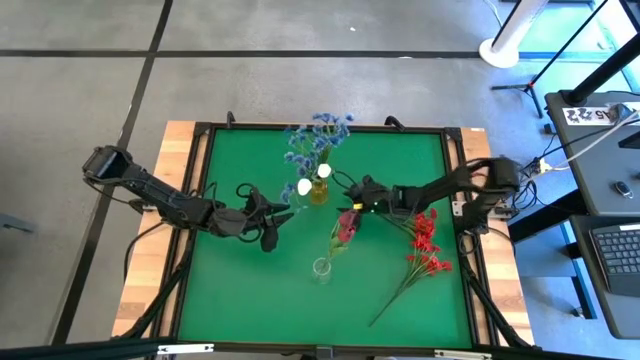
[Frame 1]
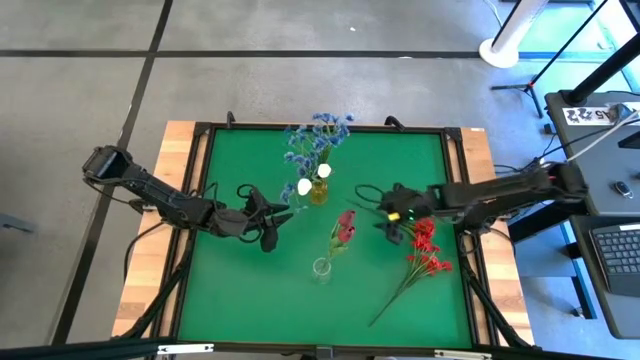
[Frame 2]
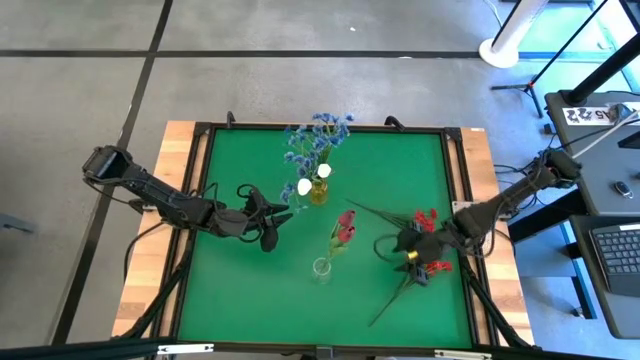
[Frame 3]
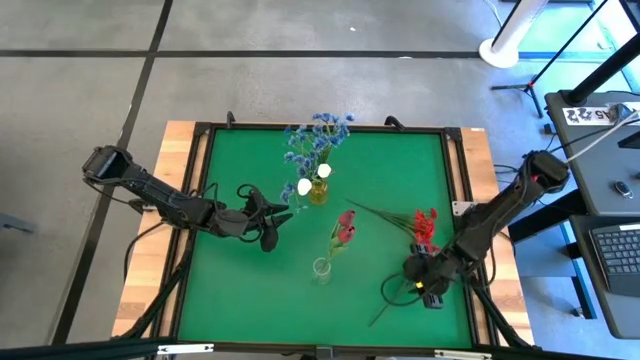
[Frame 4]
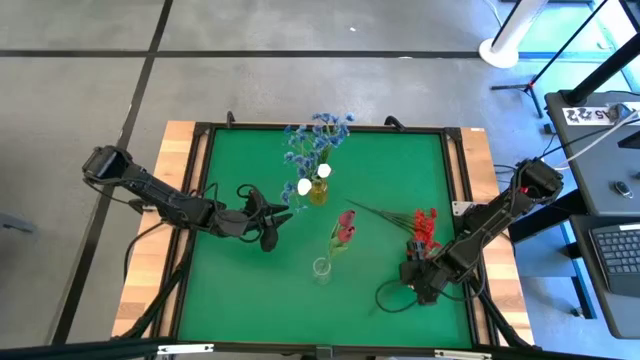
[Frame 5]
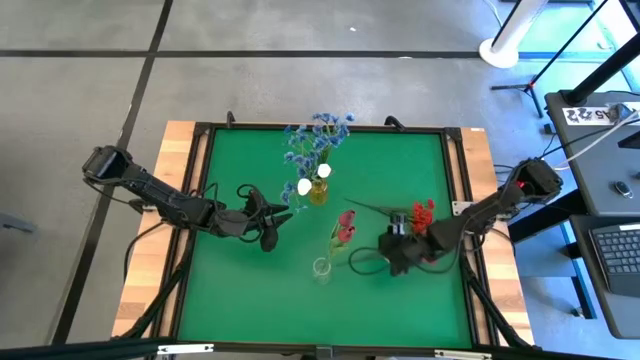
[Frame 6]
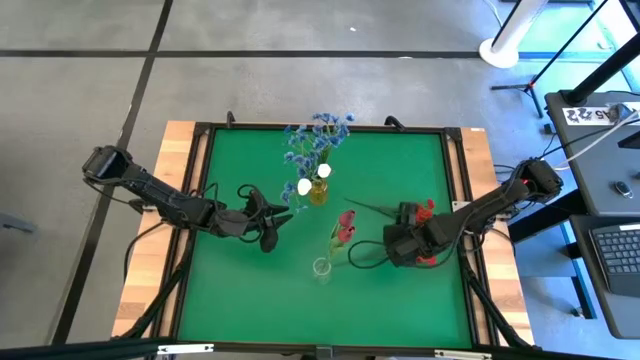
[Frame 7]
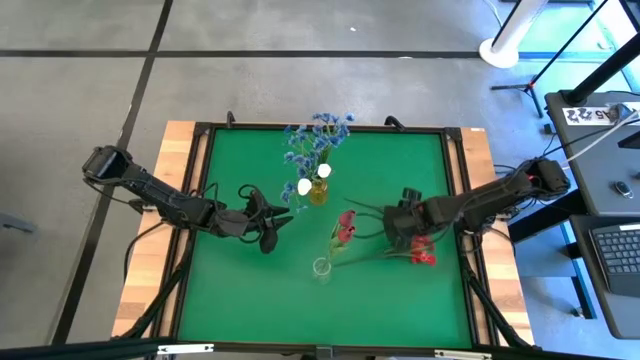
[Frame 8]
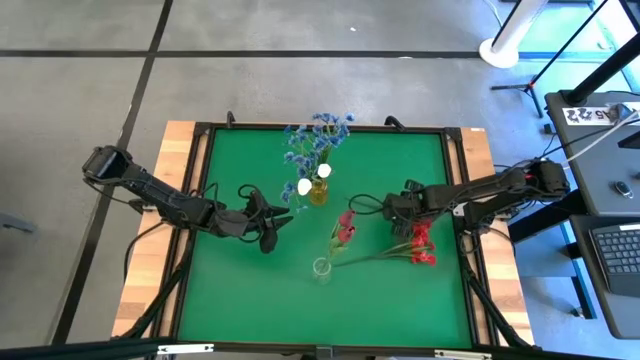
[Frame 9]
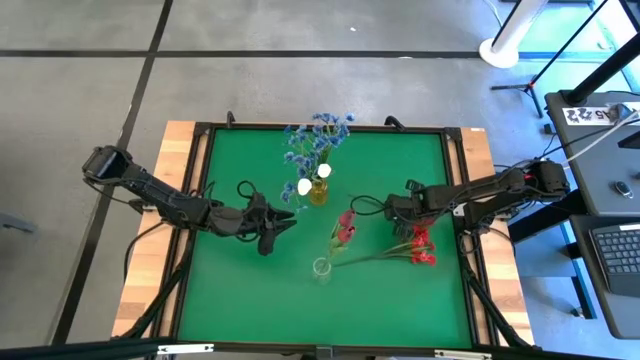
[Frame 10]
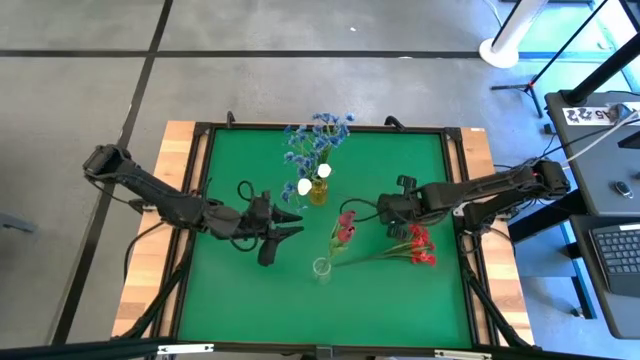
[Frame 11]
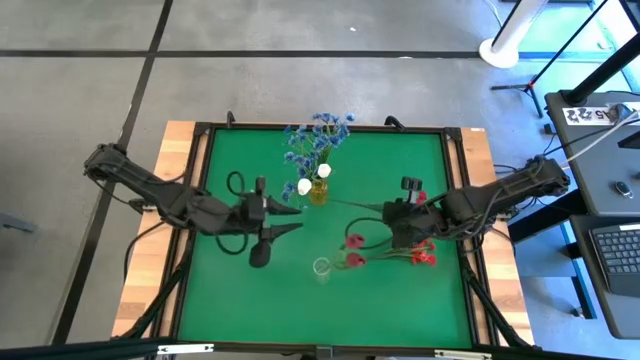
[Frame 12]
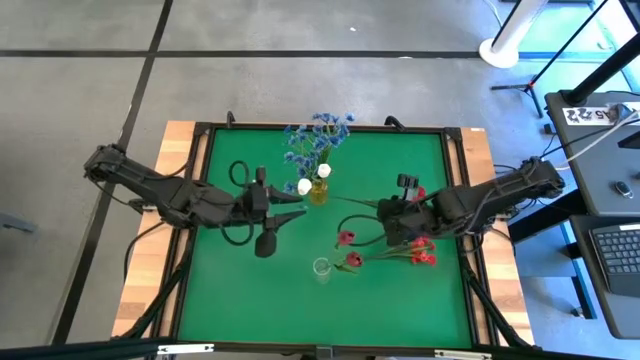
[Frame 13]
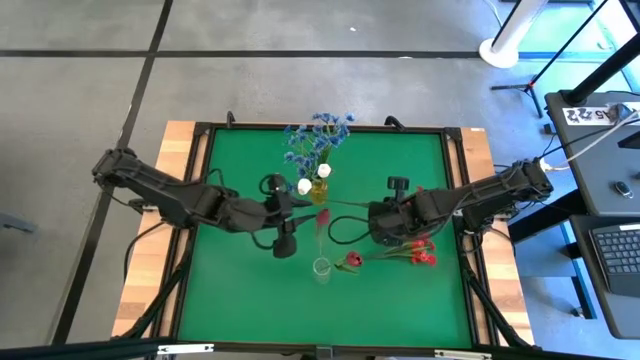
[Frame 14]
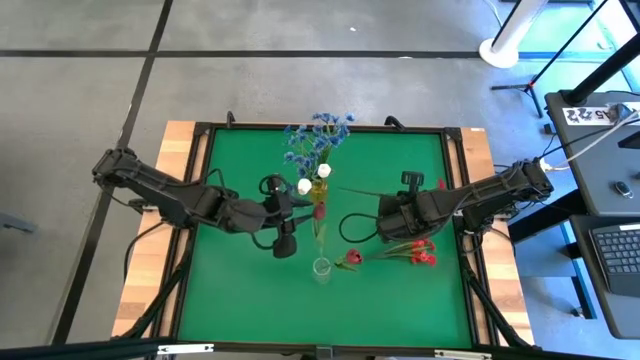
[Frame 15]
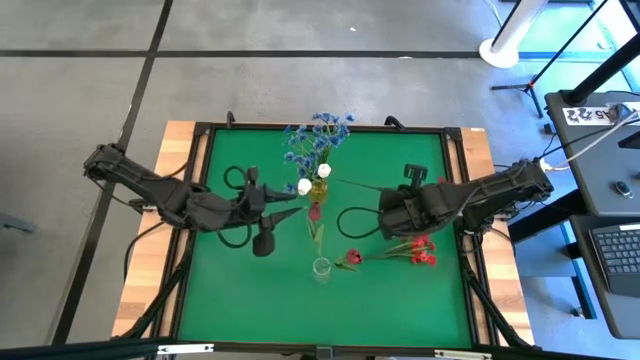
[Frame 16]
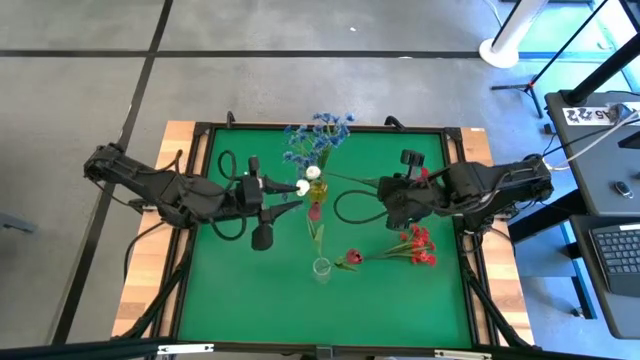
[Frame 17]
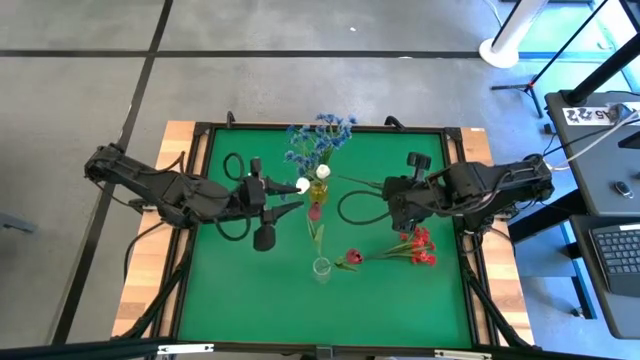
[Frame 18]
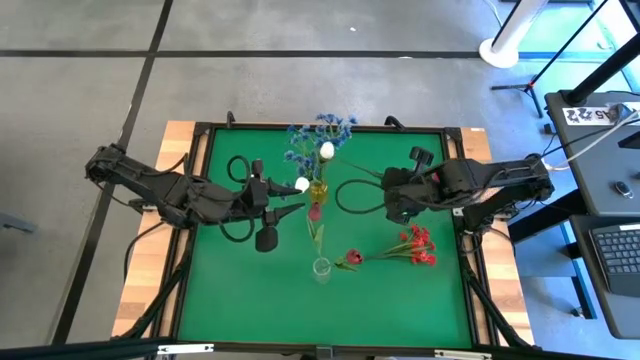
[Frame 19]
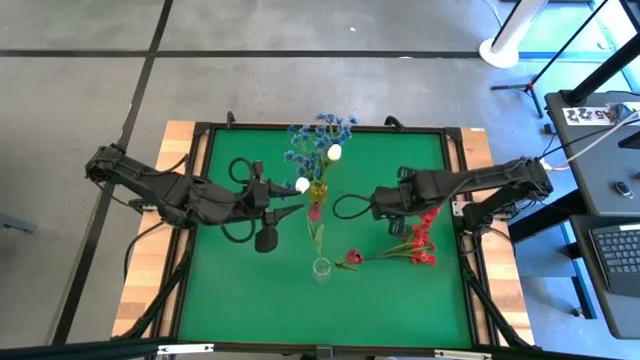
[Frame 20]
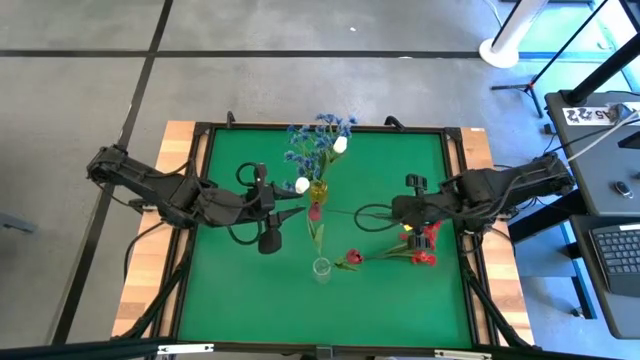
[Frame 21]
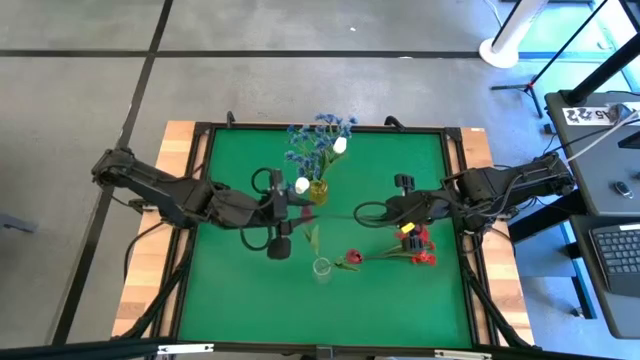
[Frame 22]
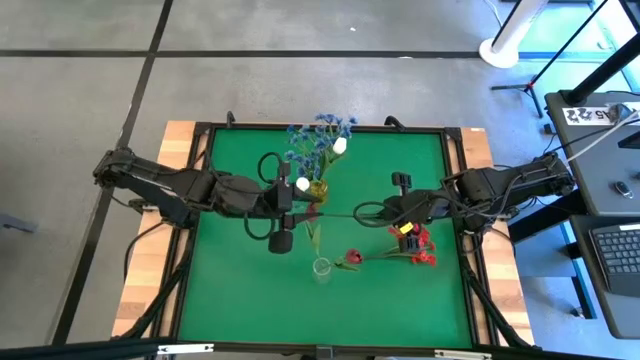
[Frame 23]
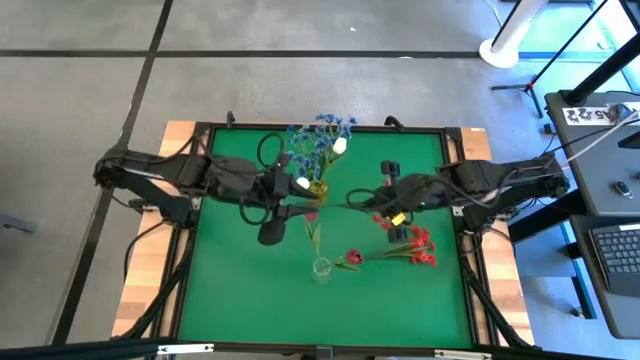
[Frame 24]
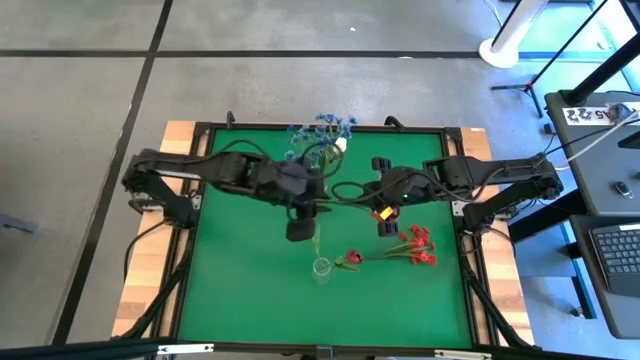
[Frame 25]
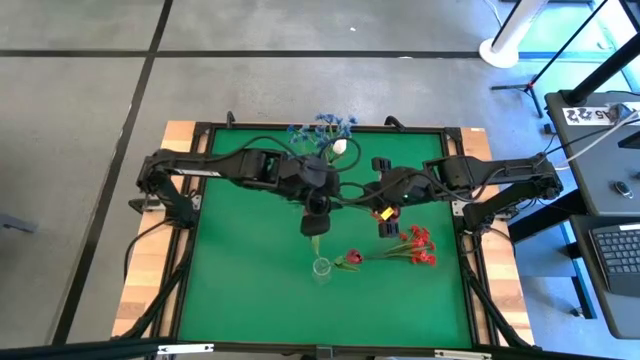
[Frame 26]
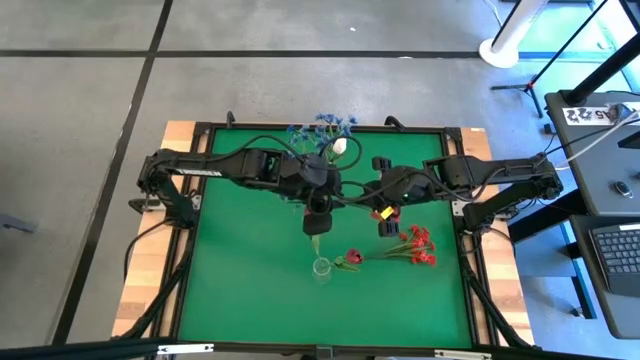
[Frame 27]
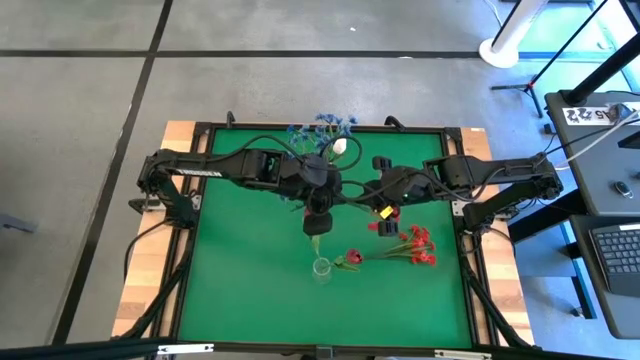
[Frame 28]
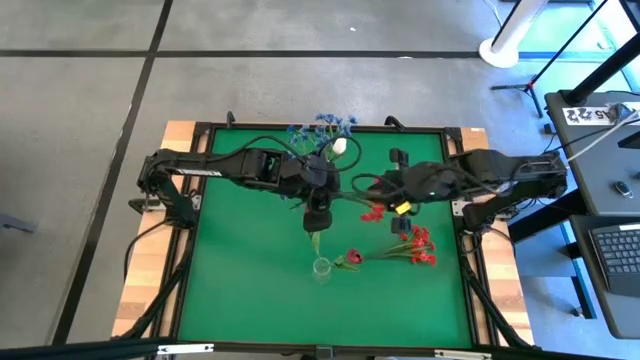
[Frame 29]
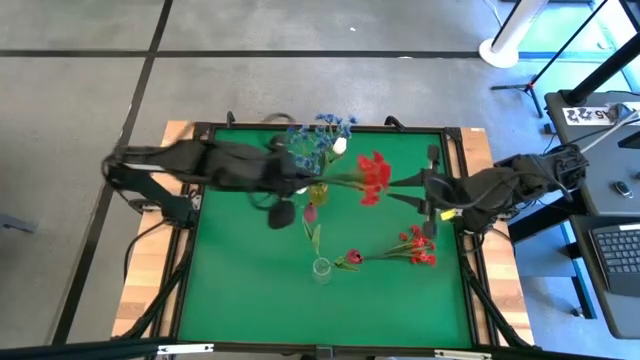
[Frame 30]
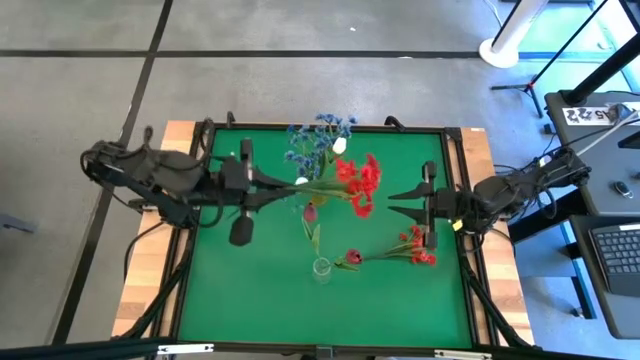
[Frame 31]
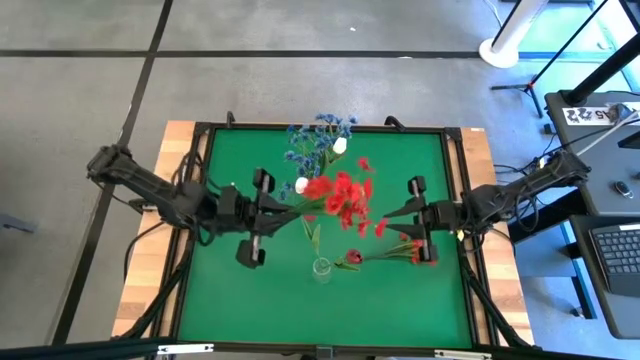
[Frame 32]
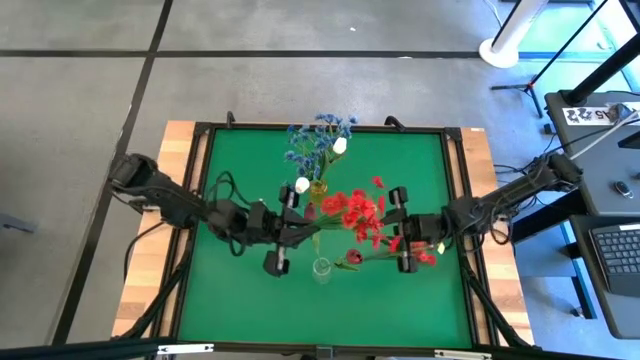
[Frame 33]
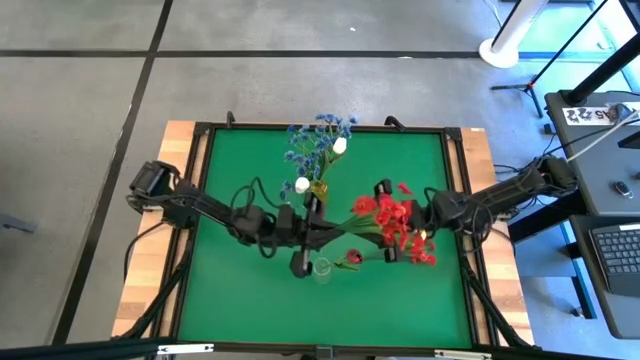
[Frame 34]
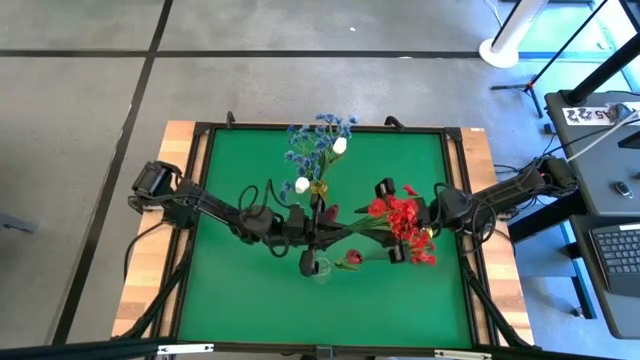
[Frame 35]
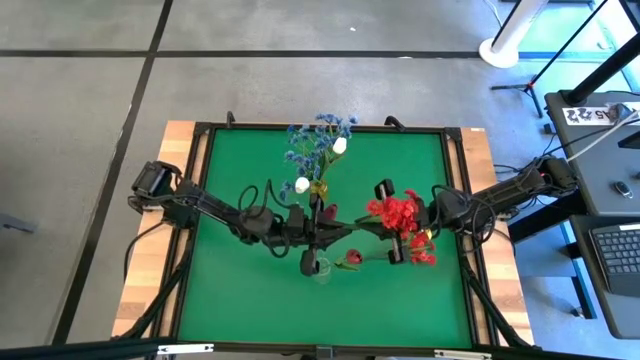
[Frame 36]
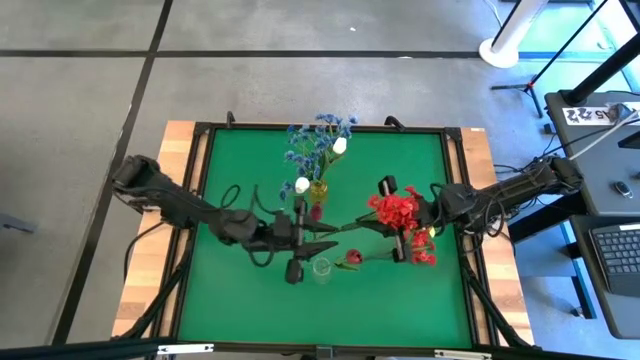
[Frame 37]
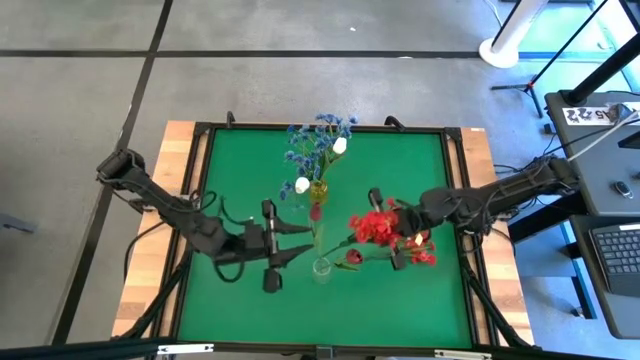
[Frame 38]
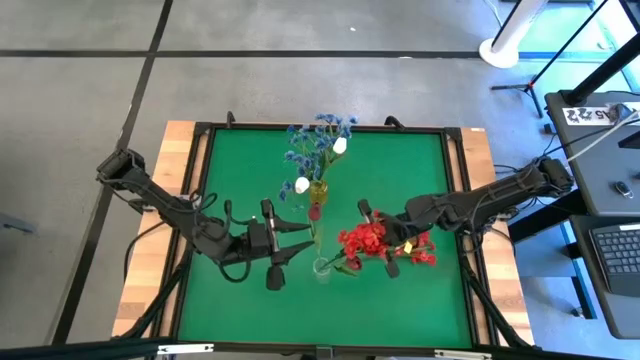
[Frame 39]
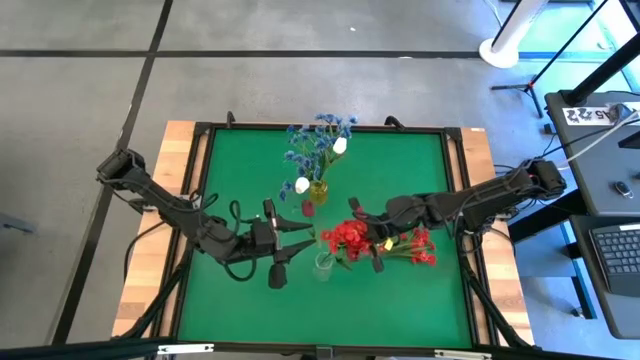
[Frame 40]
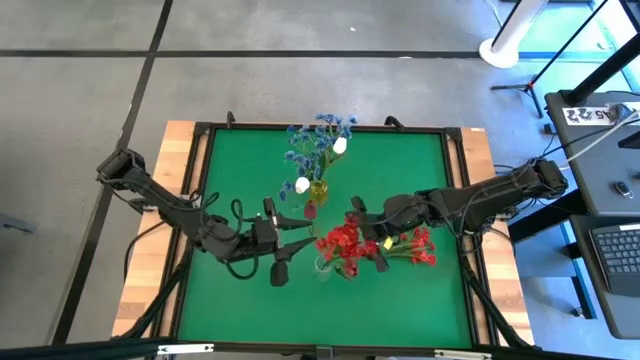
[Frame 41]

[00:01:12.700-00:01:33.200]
Task: Sort flowers into vase by color
Put the top red flowers into the transparent flower vase

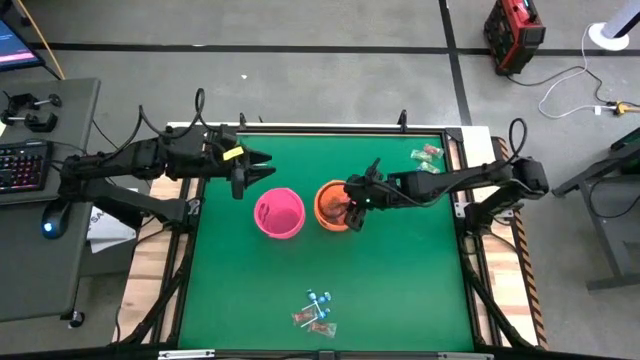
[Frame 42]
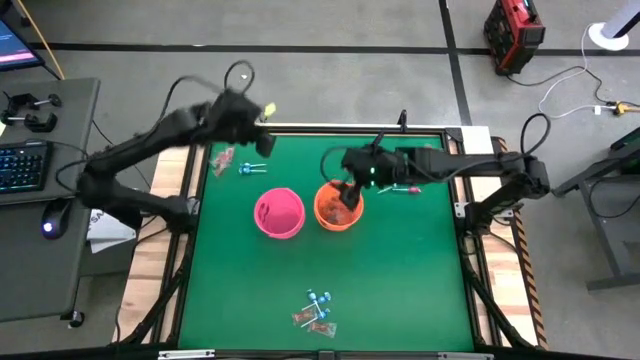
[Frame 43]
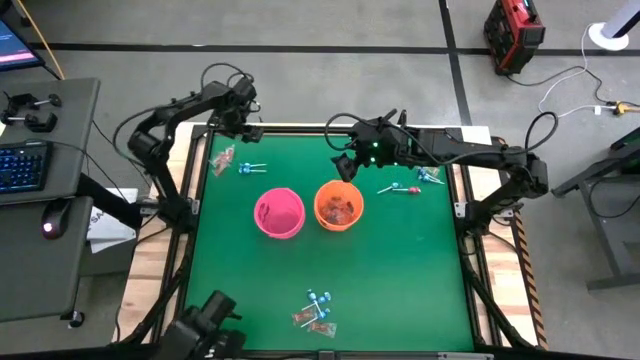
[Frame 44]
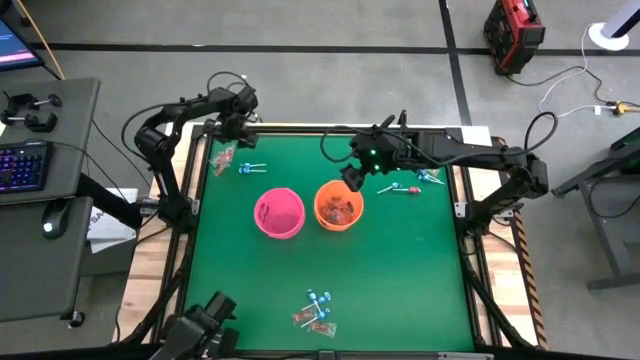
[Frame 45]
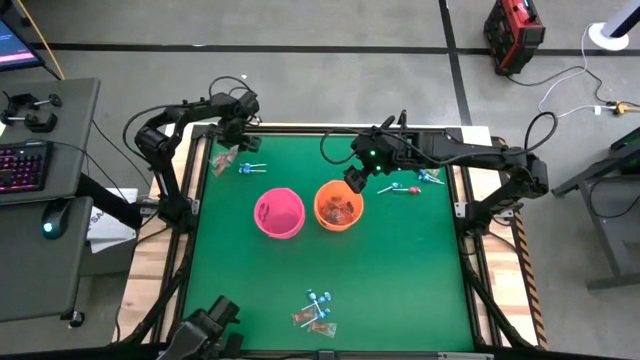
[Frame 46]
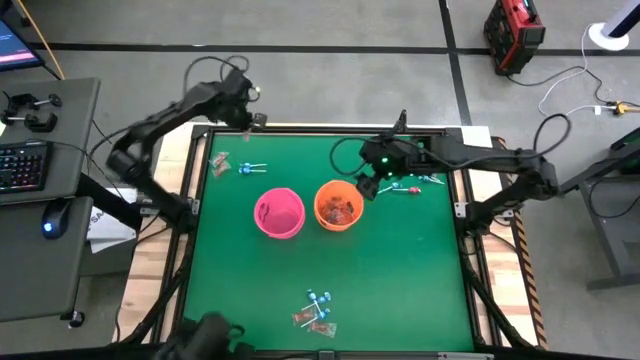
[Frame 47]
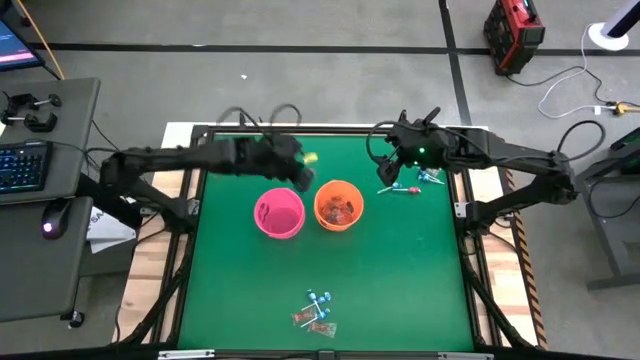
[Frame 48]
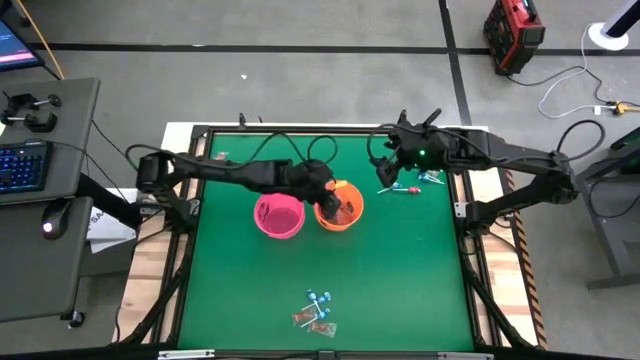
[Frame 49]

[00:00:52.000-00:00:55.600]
Task: Sort candy by brand, put in halloween buckets
Put the orange gummy into the orange bucket
